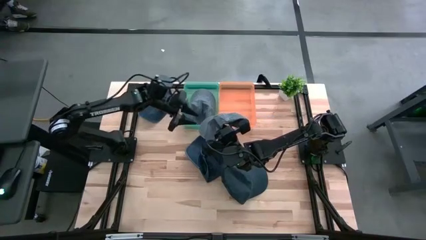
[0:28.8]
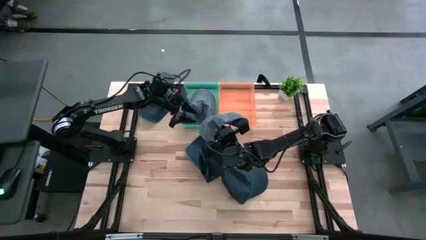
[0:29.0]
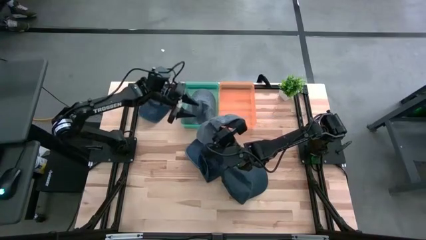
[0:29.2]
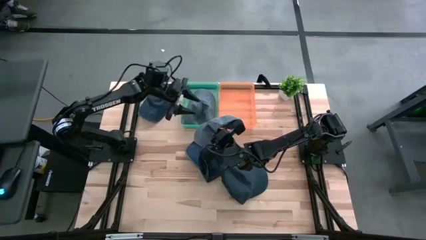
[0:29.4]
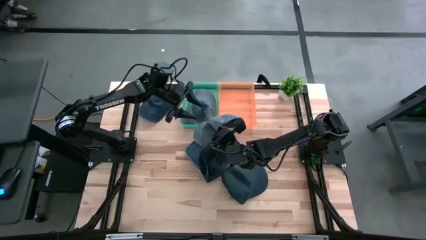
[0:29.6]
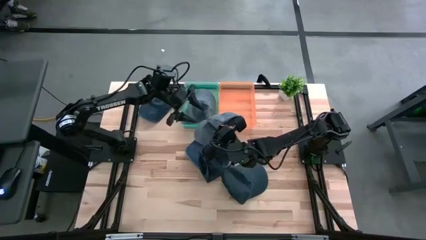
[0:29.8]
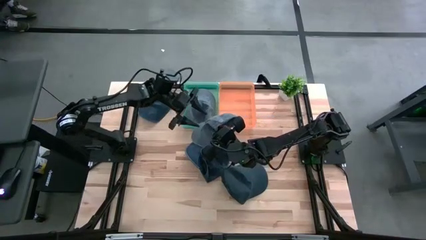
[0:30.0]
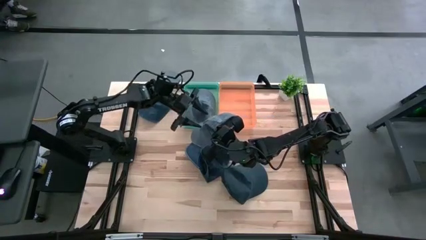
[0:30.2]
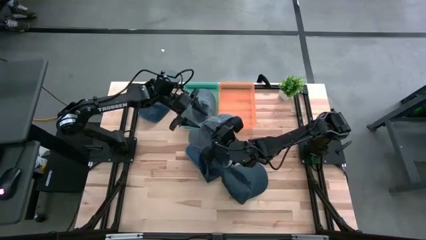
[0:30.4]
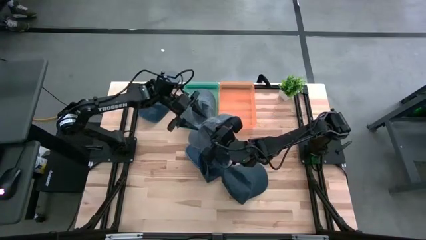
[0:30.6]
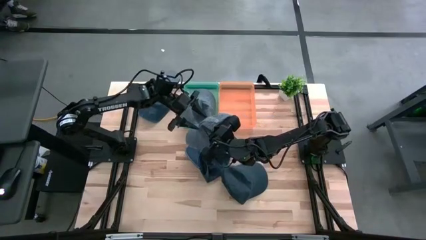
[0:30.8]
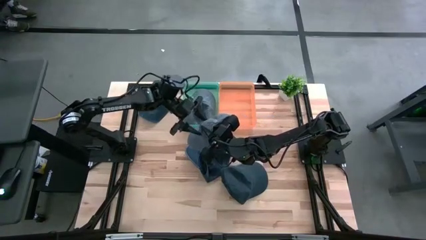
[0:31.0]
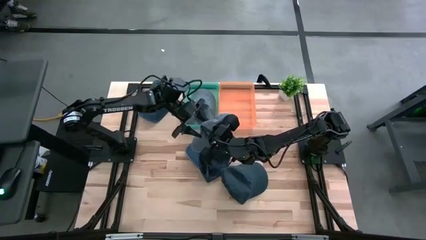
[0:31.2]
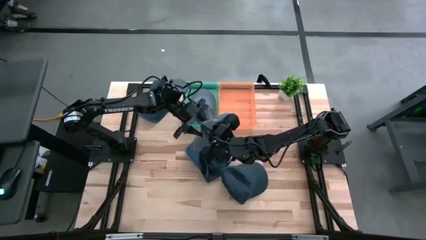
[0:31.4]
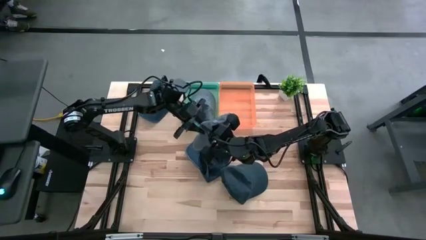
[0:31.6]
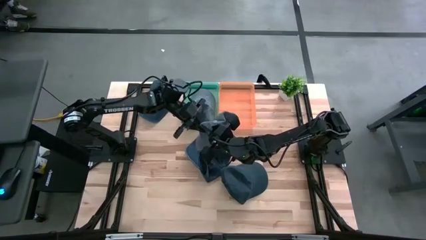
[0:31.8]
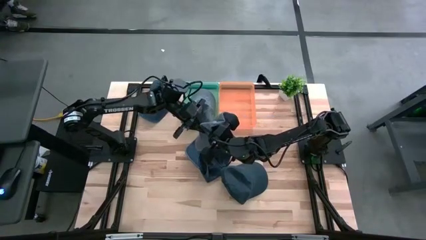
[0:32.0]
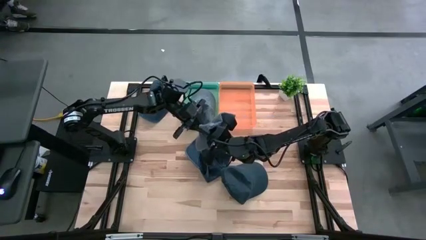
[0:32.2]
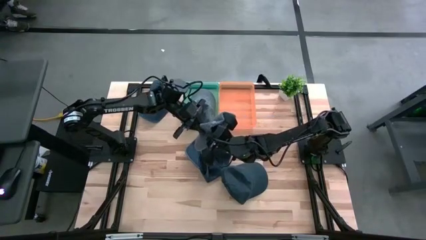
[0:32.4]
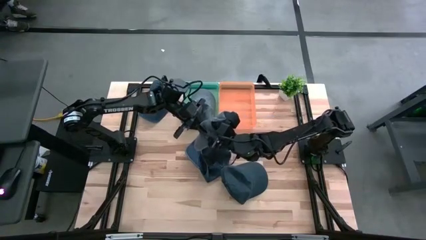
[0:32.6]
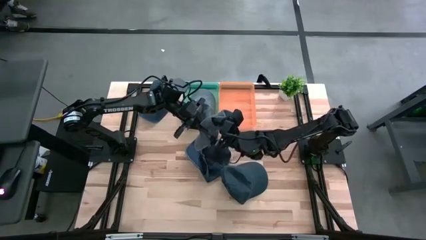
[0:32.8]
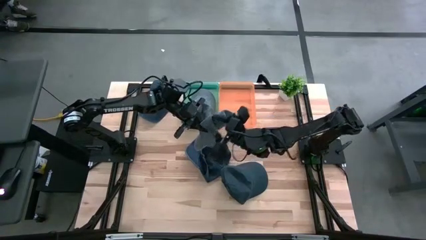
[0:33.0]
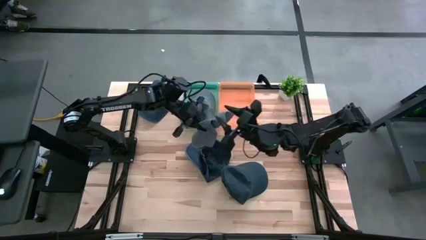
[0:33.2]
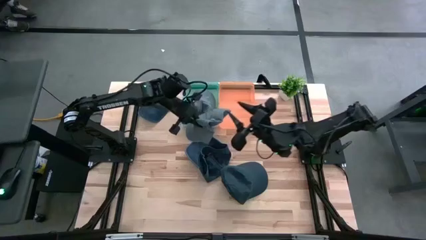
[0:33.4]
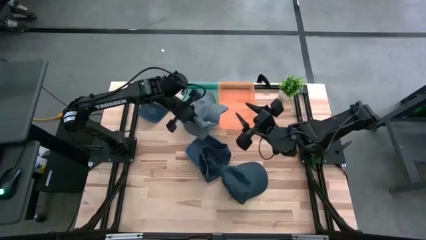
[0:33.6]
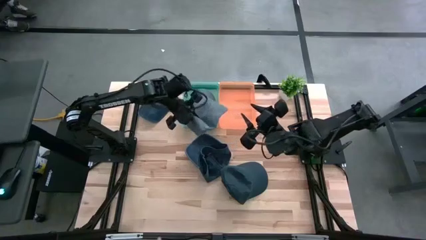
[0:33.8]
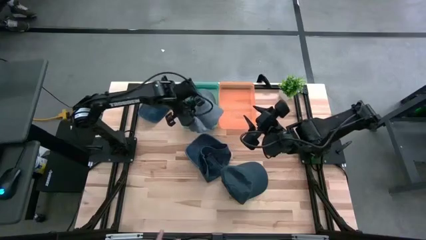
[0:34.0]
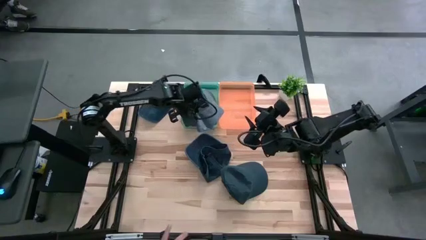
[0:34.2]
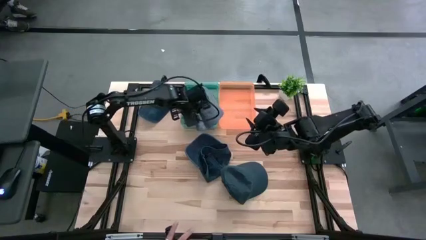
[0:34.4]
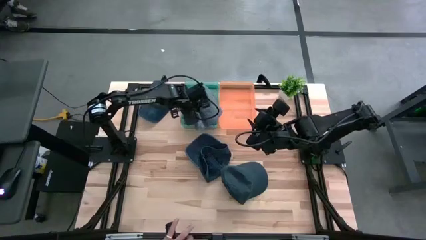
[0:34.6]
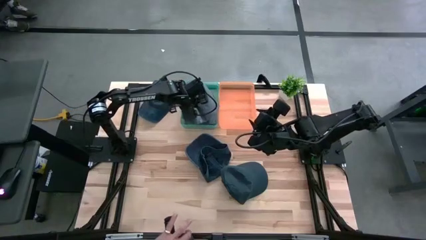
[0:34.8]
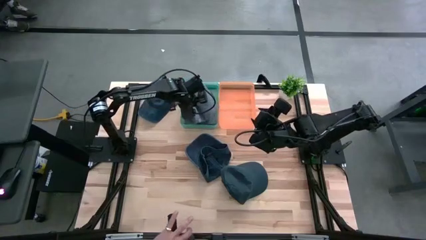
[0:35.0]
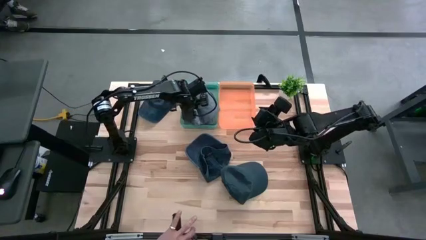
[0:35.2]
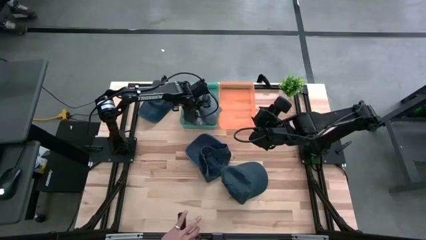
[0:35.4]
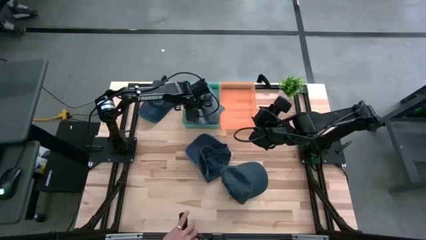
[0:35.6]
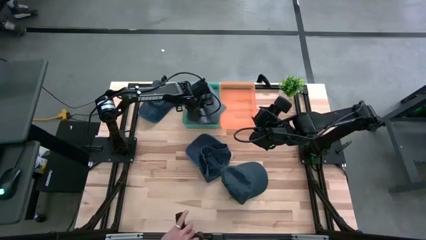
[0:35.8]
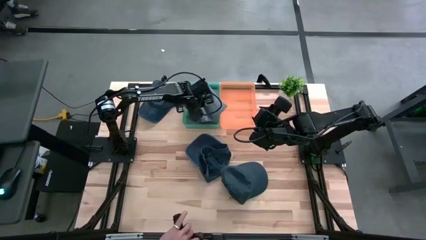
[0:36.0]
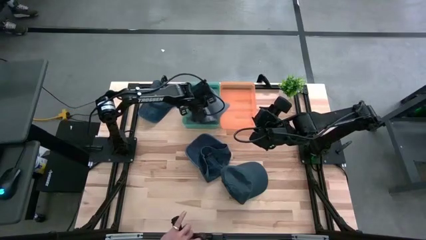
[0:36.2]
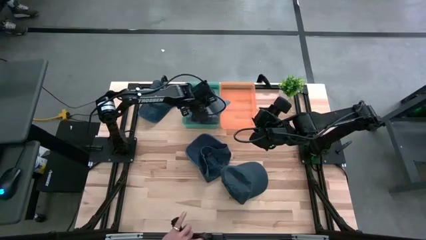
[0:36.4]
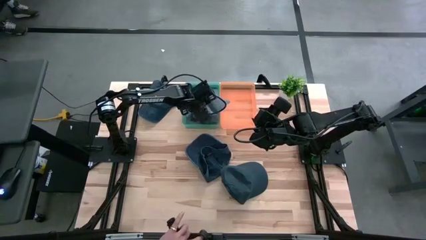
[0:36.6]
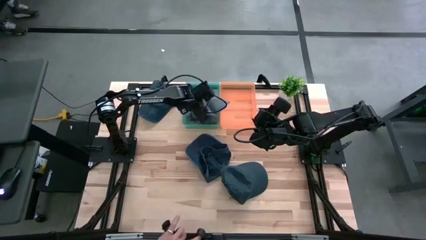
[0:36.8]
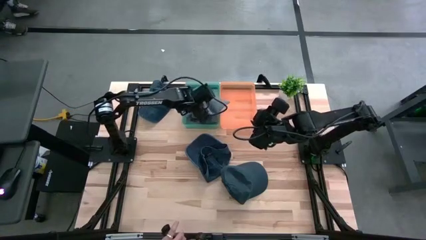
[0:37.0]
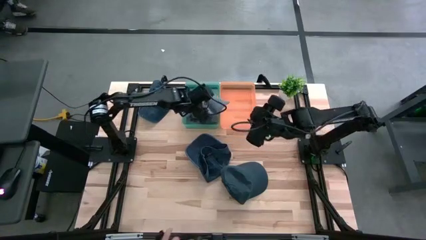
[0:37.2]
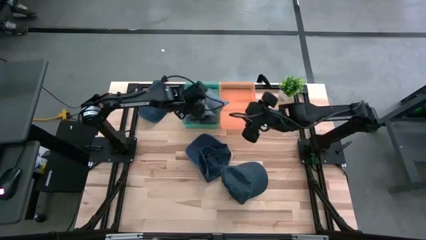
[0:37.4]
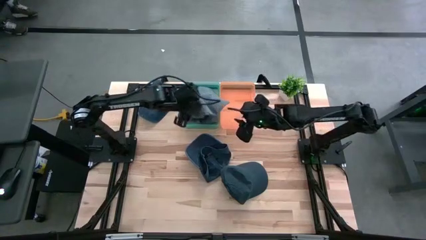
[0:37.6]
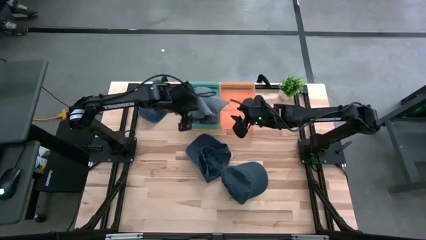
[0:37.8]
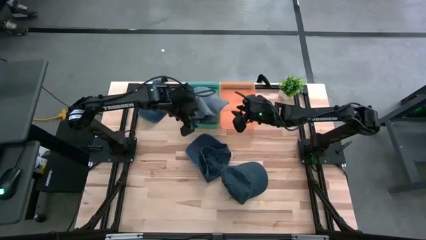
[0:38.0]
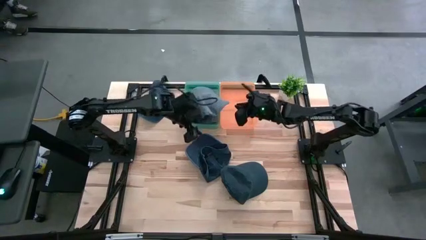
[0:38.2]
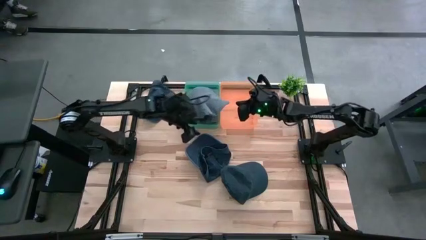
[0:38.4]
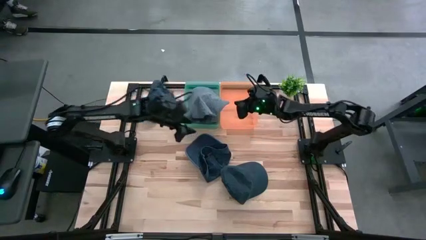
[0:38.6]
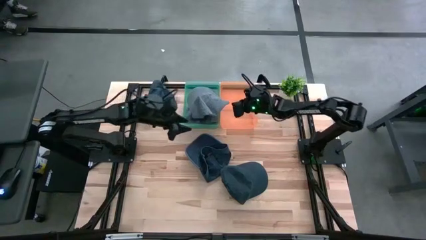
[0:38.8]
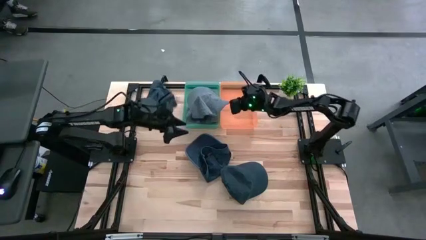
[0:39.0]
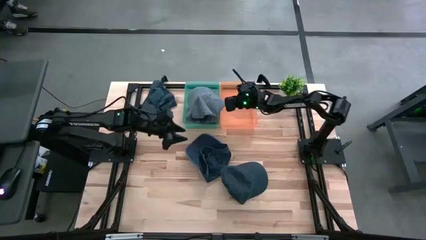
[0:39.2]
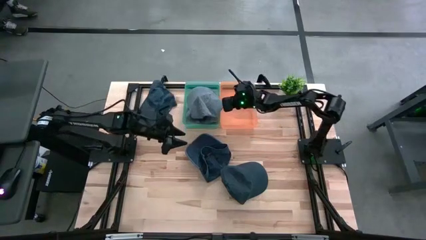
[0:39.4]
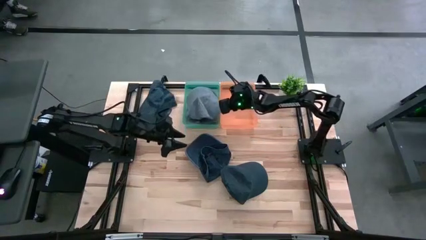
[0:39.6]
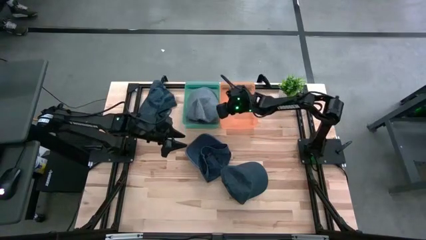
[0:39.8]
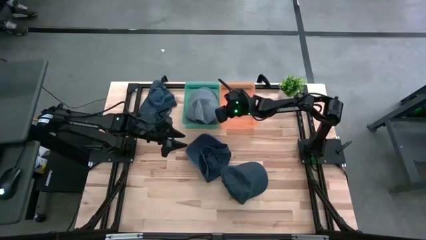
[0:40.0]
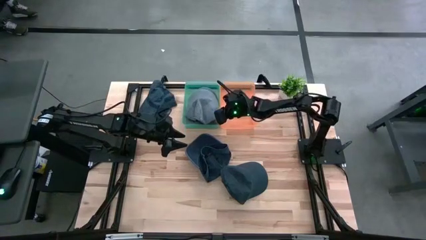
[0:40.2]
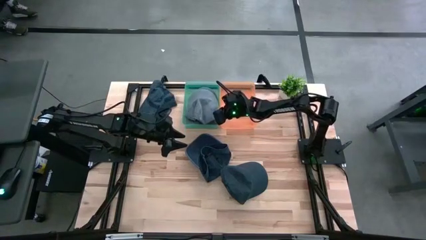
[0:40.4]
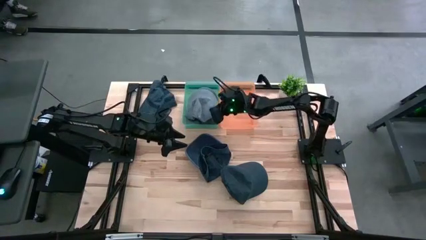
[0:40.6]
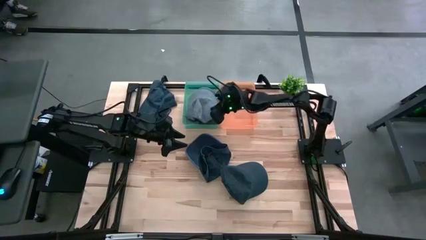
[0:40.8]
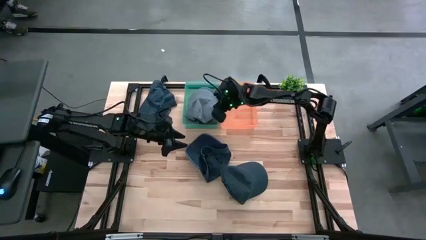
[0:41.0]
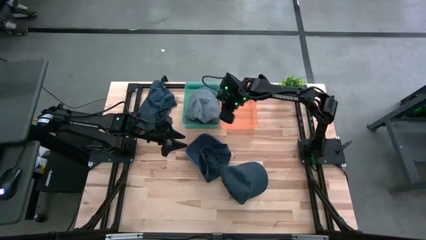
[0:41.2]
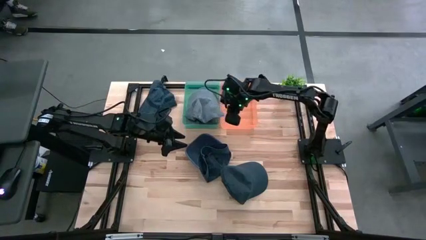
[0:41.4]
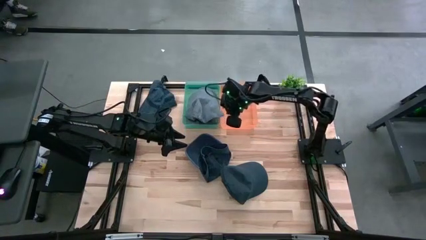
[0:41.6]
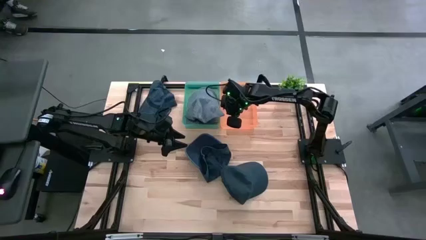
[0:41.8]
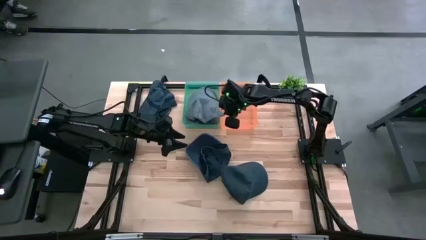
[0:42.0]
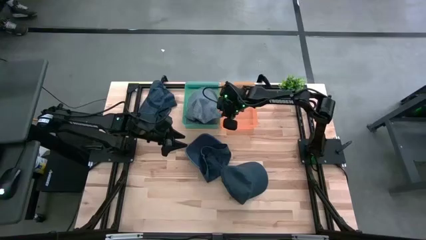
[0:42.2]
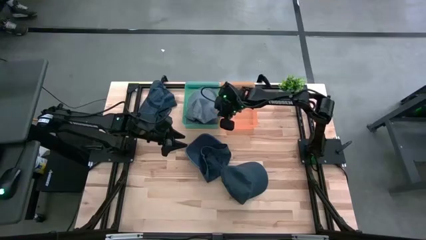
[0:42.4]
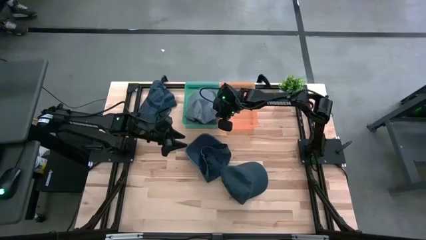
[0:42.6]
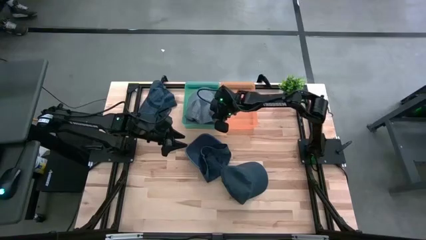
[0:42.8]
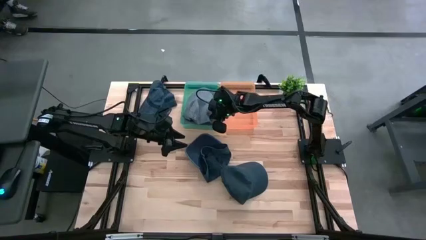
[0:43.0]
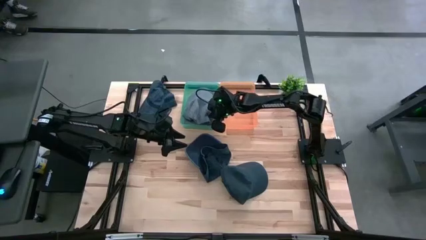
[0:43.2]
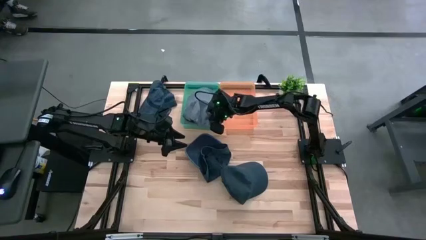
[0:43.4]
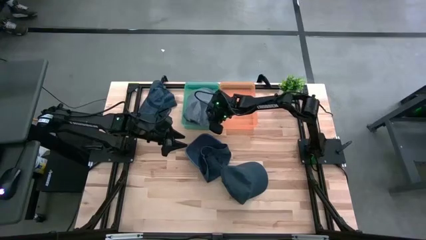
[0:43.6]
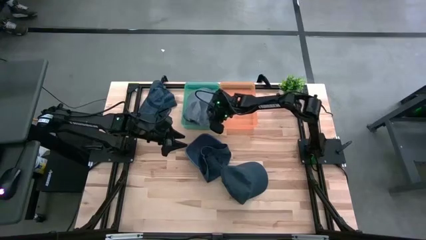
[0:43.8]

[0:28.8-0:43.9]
Task: Pick & Place hat
Put the gray cap into the blue bin
